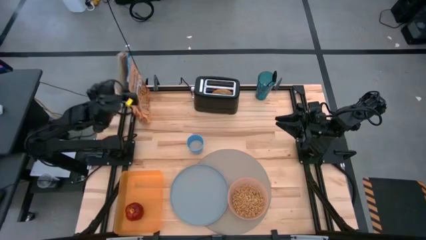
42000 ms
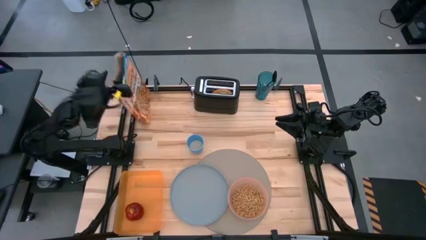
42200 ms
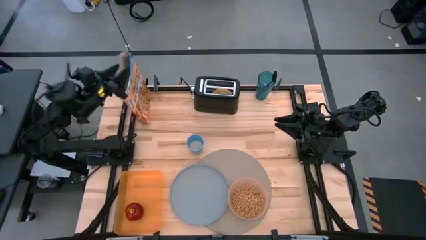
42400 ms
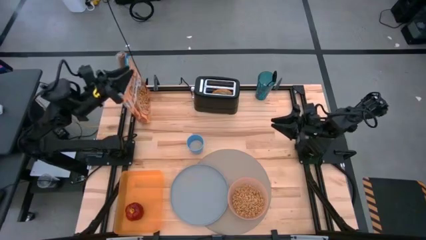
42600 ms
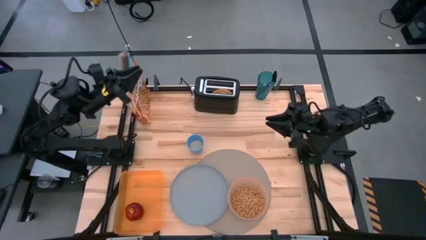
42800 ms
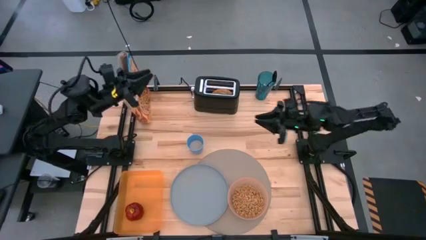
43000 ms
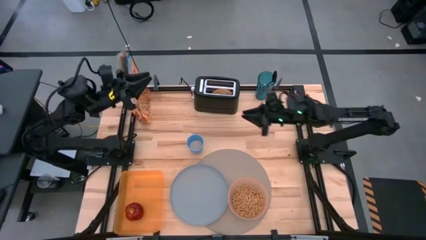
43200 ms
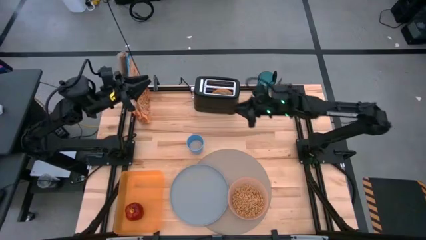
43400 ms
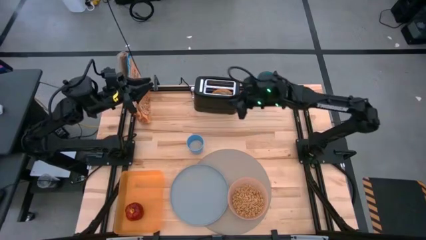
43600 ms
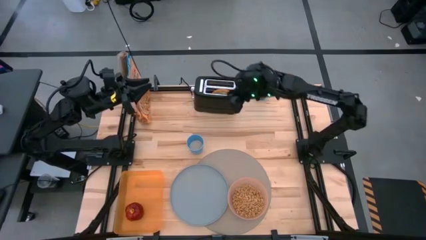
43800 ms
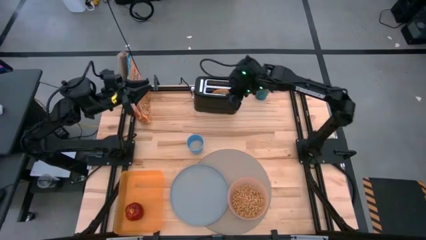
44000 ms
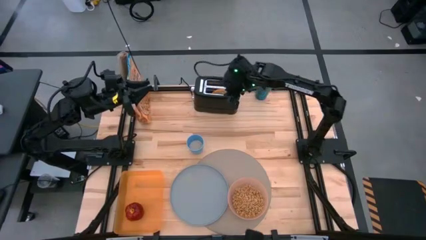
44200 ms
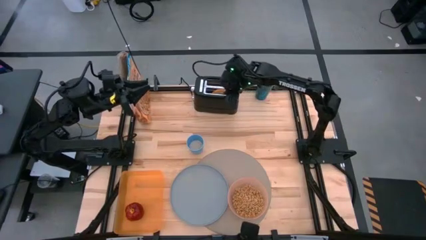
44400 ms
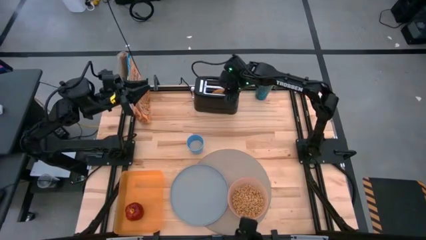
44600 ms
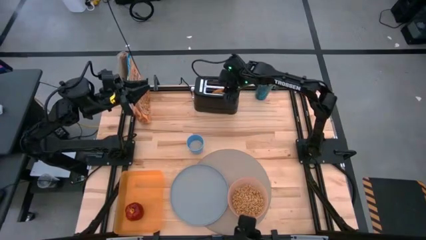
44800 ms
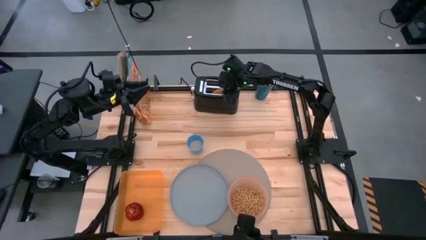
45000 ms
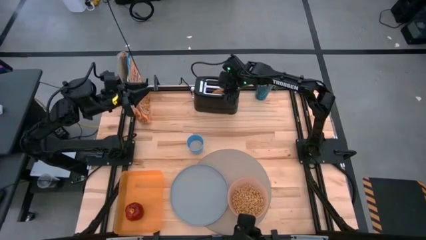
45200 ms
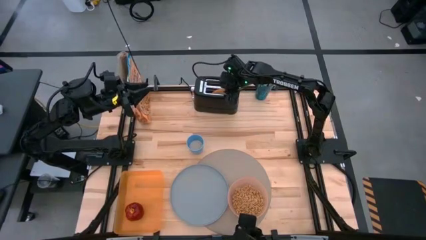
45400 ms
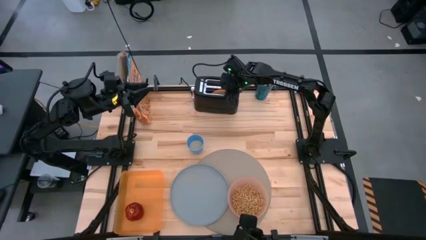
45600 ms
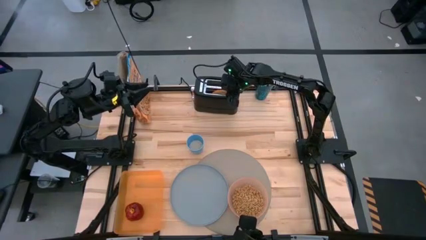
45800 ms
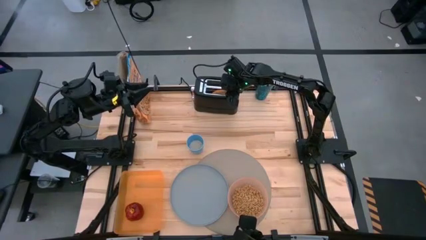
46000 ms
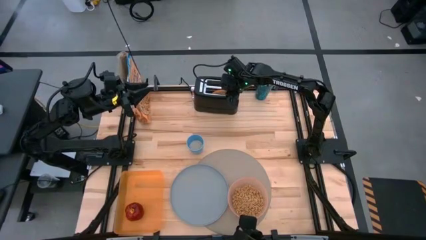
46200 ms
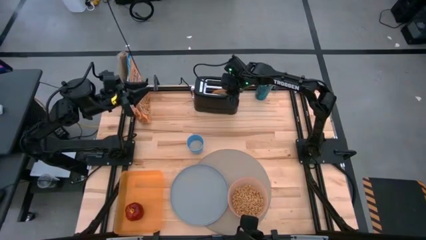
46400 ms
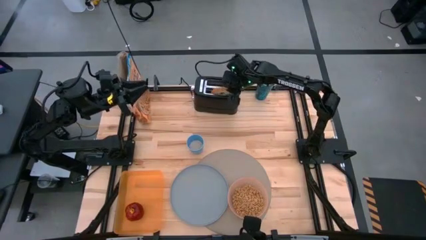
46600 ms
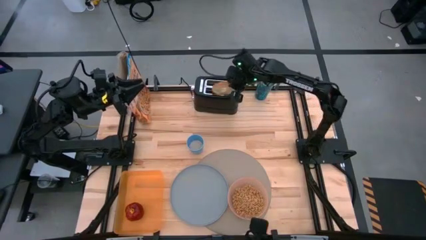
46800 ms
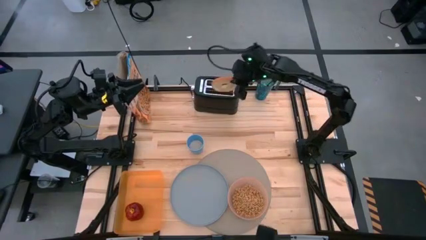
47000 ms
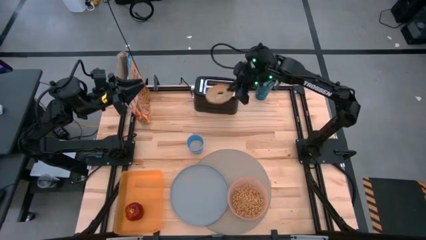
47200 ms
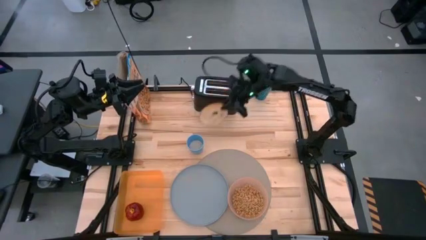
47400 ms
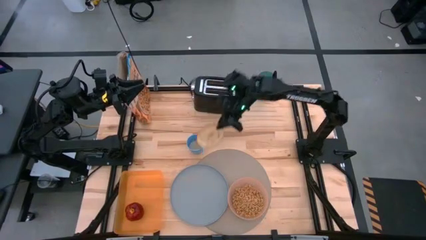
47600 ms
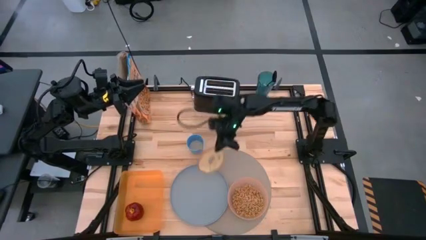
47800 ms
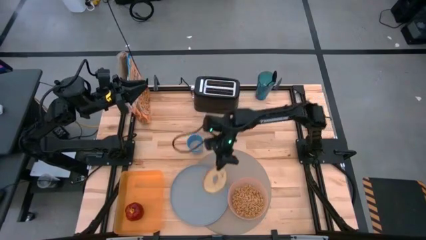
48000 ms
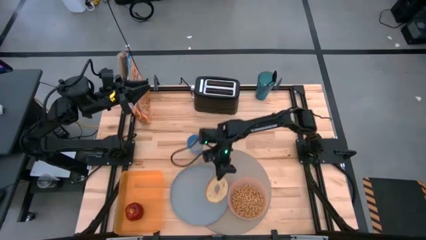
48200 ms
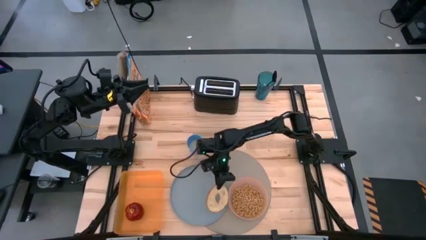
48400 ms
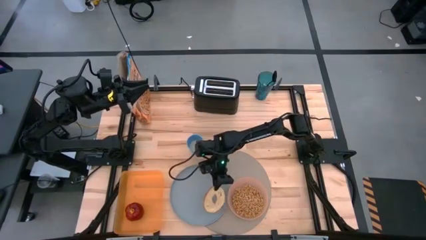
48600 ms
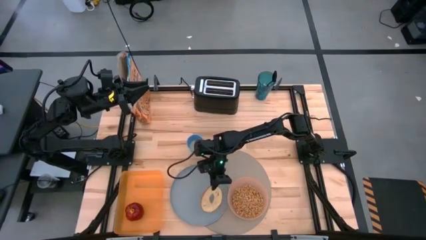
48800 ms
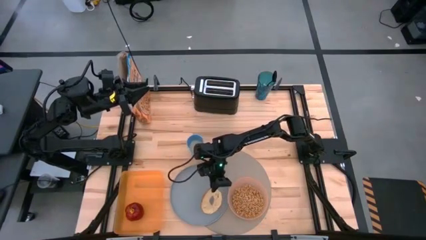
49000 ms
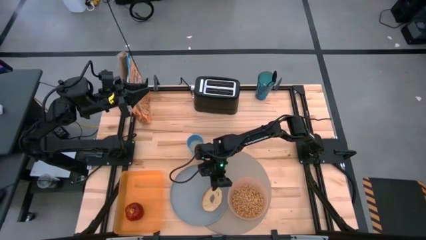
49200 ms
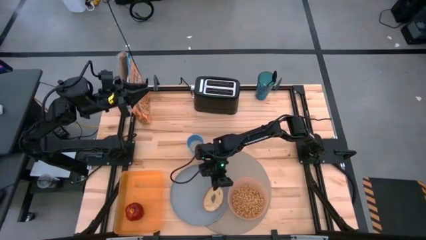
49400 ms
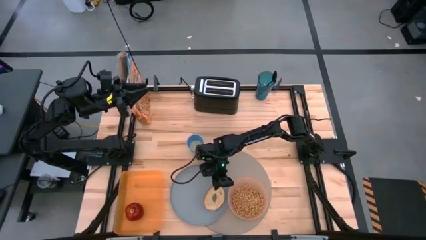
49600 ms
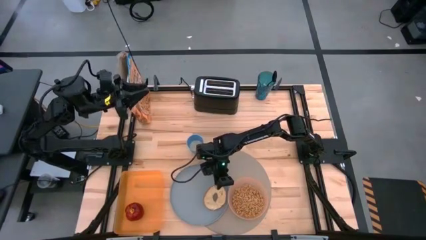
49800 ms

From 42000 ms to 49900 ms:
Task: Arrange a breakfast setting
Put the toasted bread from the toaster oven on the blue plate

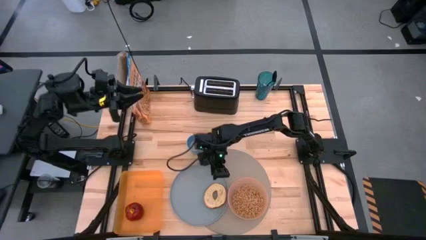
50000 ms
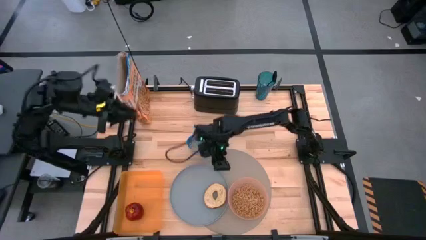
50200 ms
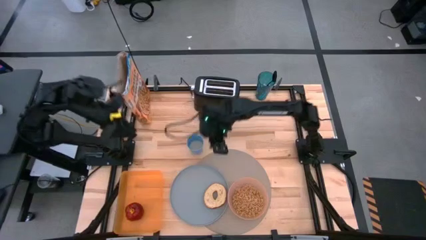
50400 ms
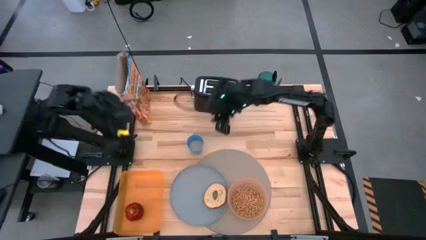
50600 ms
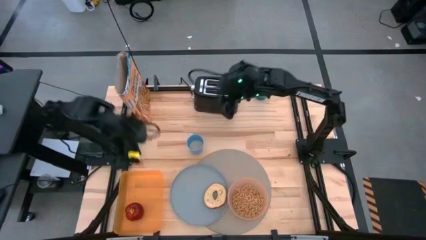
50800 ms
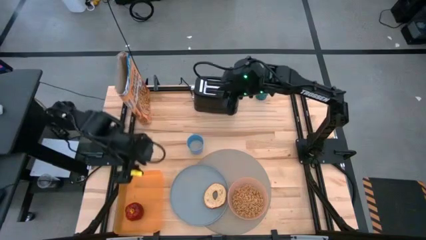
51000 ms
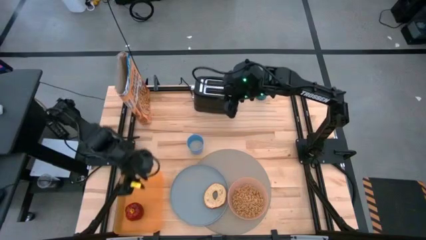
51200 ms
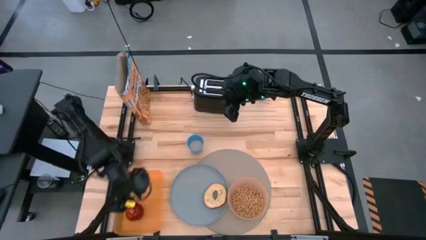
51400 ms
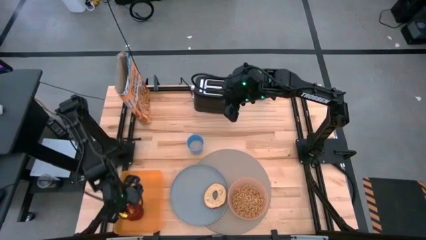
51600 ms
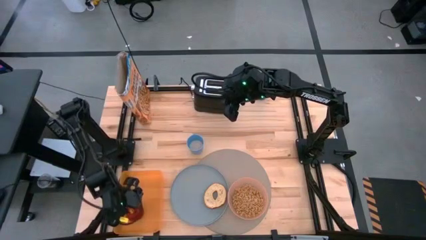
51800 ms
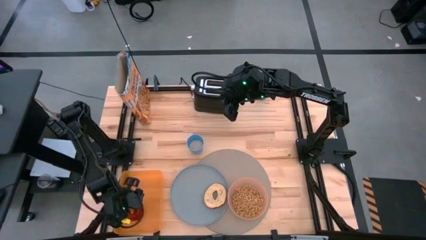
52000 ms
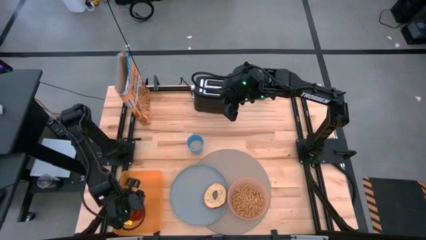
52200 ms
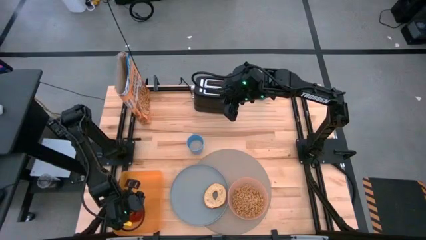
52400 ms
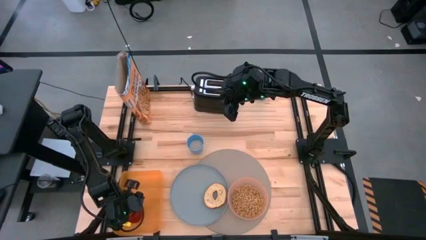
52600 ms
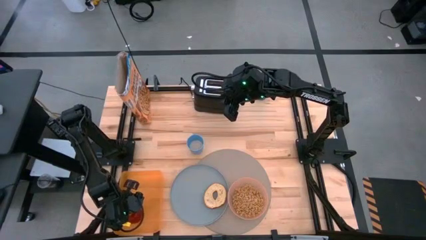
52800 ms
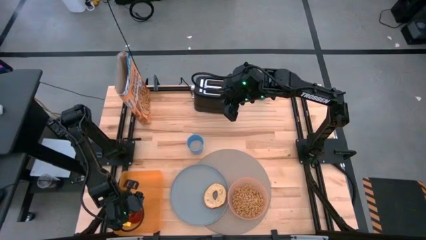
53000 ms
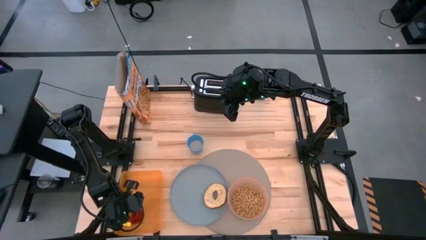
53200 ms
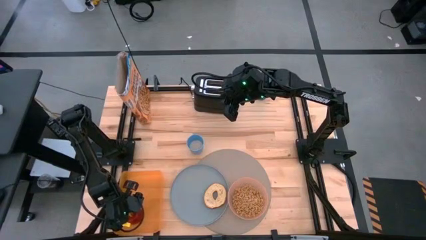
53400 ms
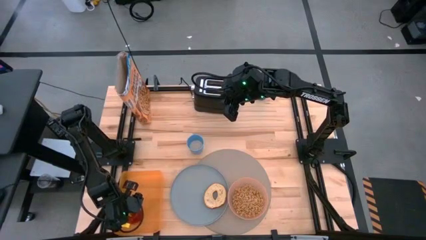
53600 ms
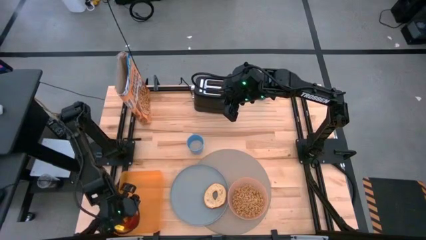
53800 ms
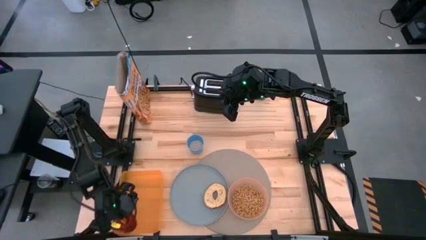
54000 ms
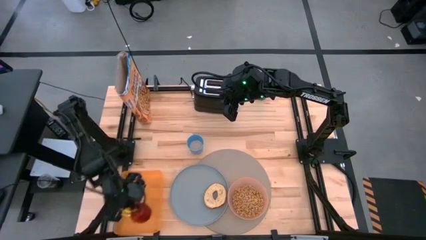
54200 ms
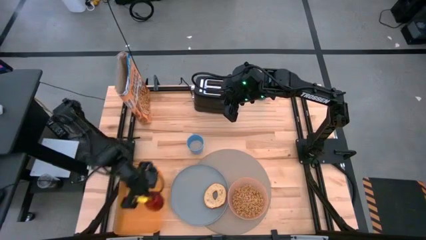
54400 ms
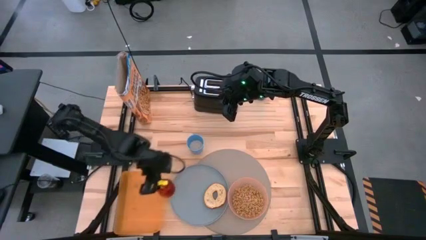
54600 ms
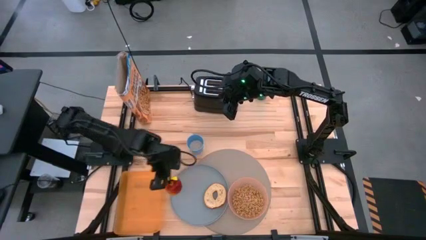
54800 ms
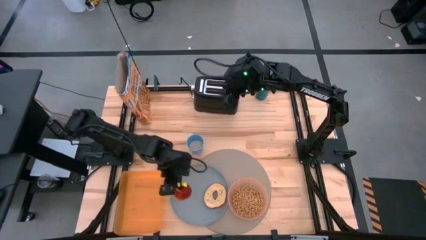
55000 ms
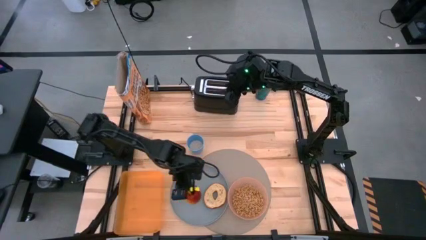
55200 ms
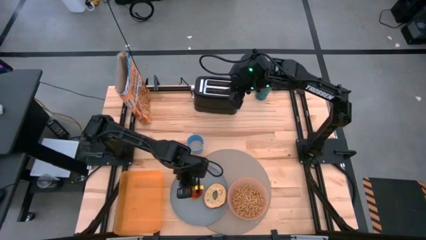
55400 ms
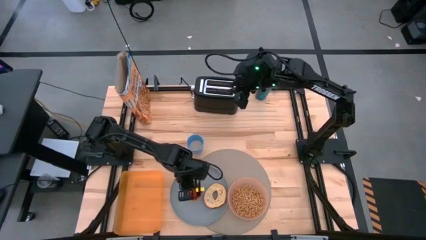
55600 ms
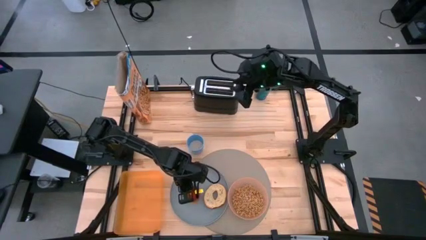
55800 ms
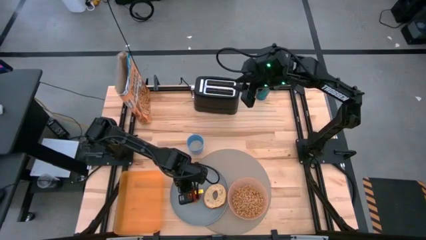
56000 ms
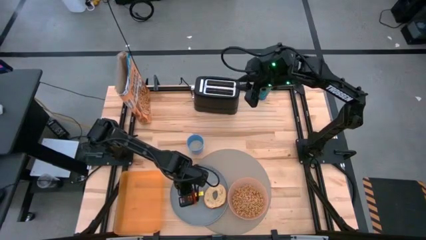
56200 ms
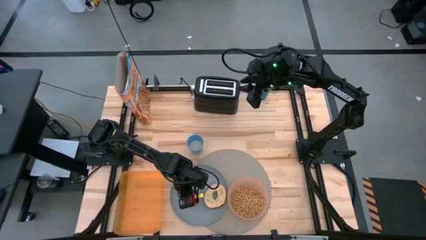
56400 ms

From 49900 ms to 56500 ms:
Put the red apple from the orange bin on the blue plate
